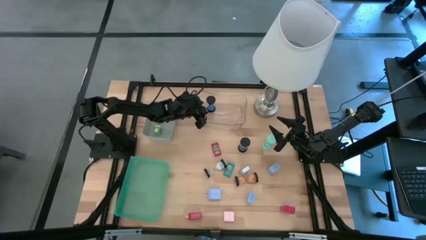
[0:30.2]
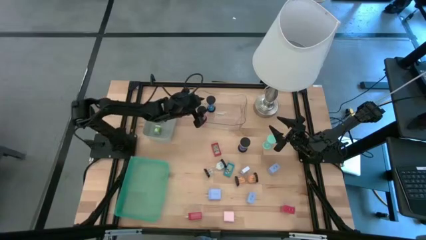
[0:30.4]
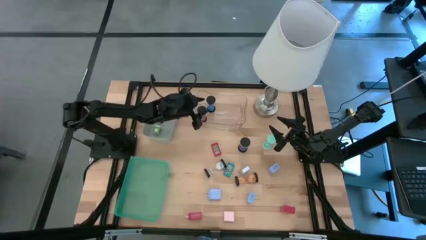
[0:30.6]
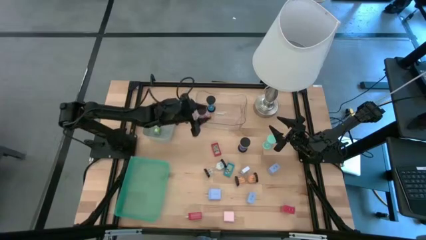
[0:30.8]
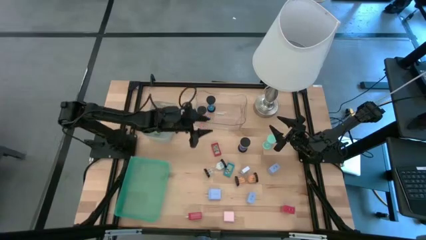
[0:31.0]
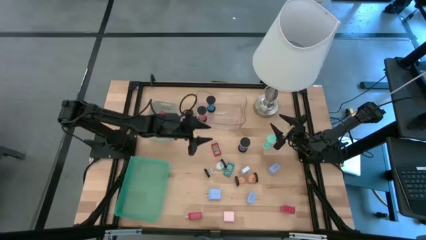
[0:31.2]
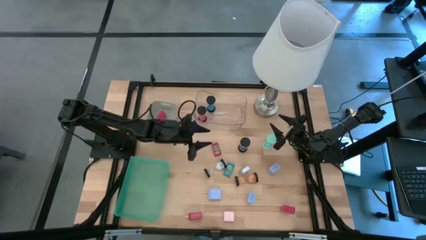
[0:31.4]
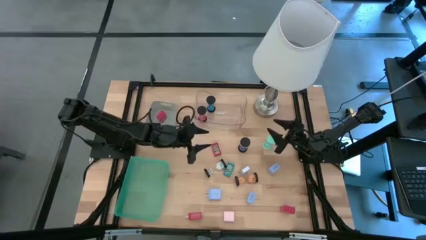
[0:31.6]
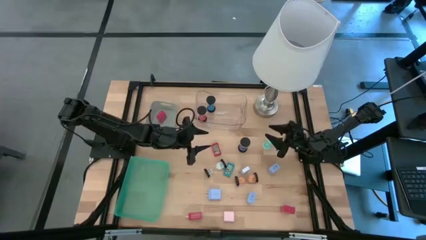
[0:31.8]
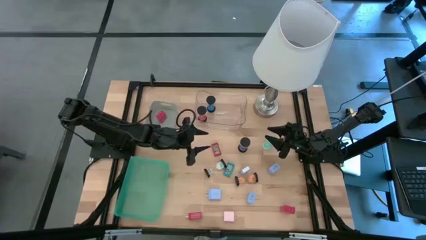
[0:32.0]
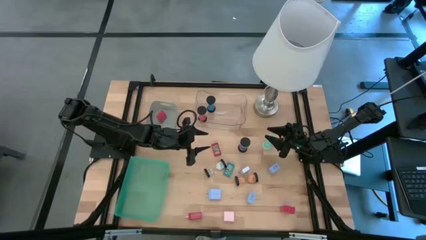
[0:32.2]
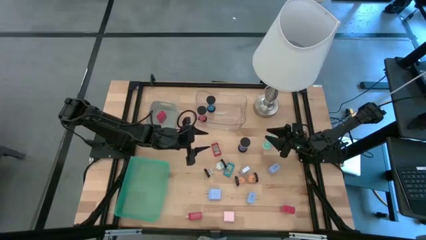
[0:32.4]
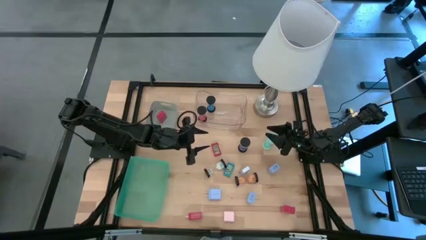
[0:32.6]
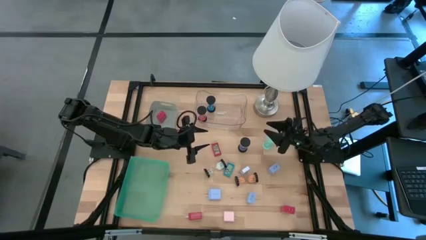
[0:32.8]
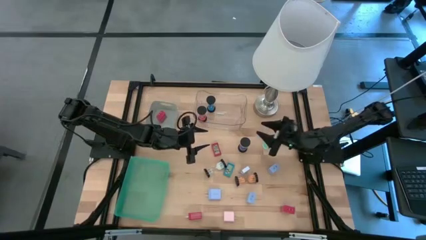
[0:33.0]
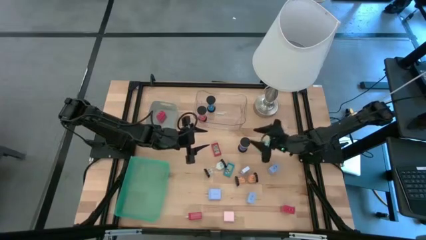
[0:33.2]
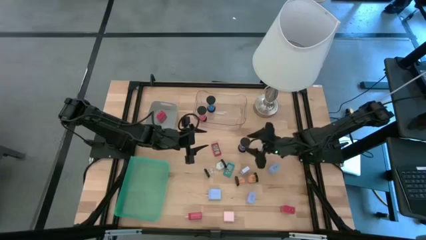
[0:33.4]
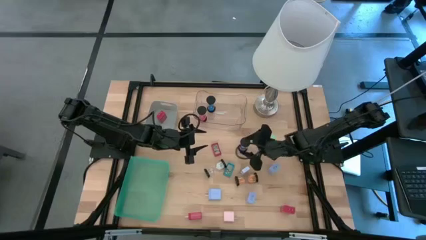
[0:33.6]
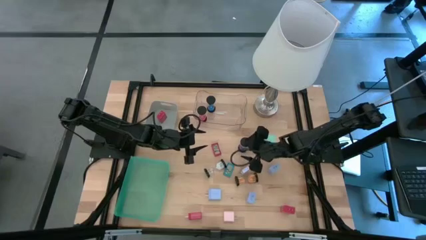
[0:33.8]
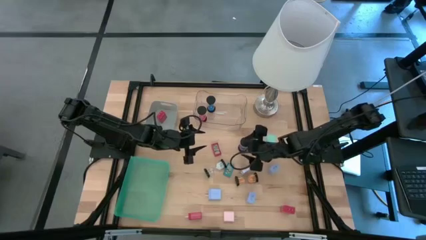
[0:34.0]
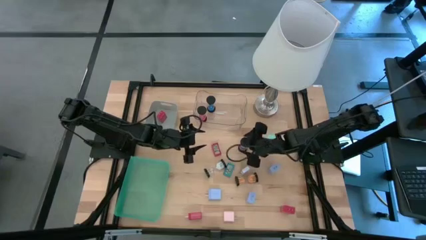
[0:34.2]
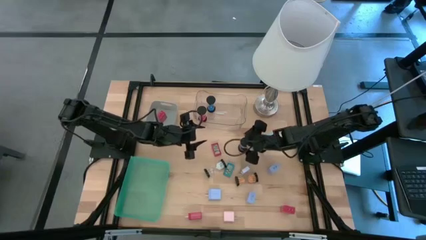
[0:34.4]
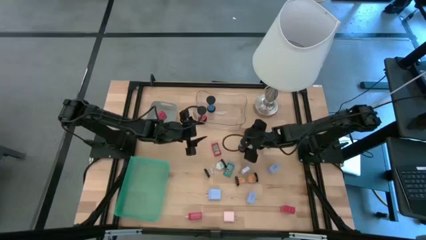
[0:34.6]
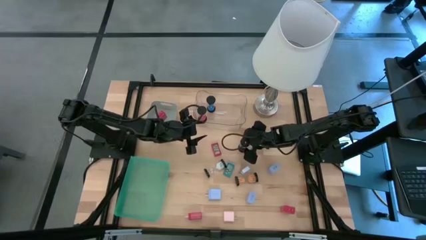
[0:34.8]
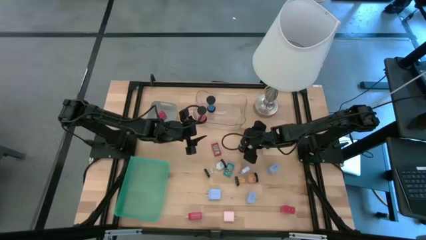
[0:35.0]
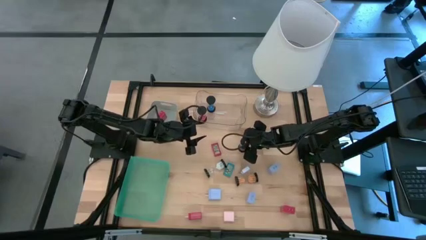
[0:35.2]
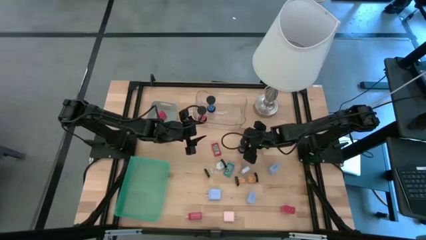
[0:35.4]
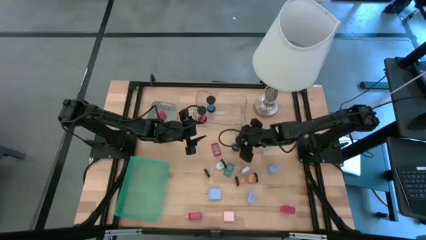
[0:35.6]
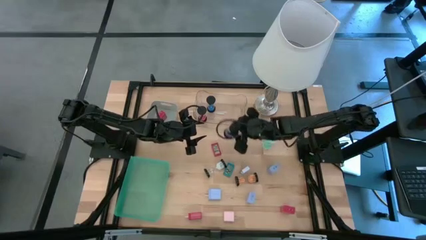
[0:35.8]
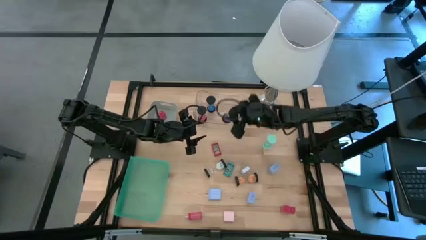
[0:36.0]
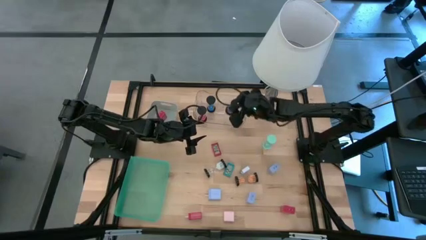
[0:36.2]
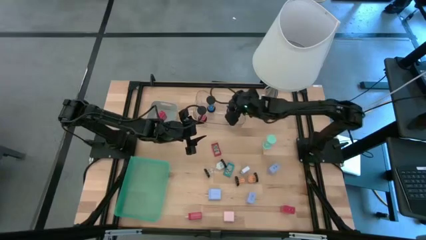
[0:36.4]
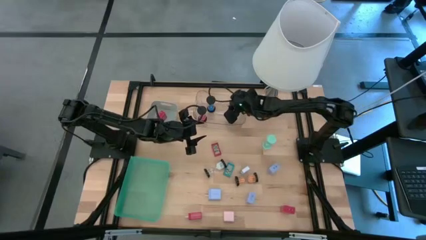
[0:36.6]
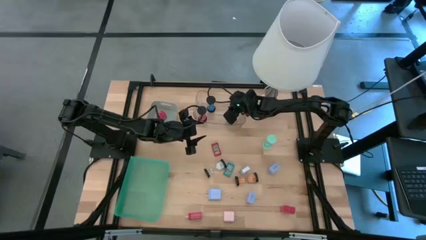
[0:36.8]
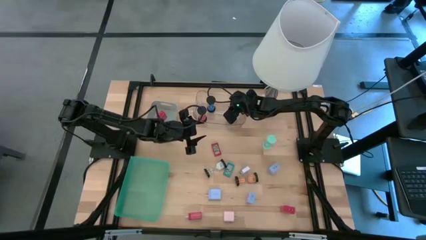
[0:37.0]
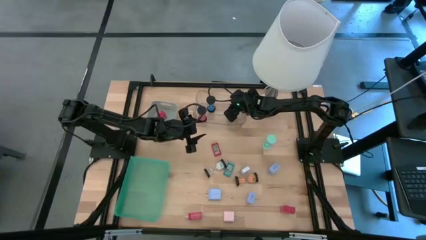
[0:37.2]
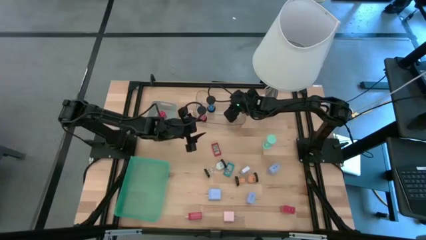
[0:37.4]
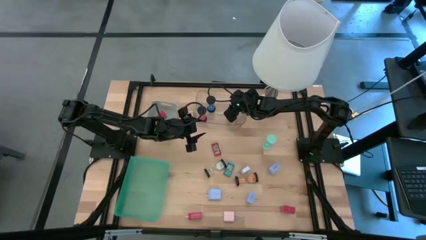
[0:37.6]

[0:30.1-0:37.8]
Task: Pick & Place Office items
Put the purple hourglass into the transparent bin

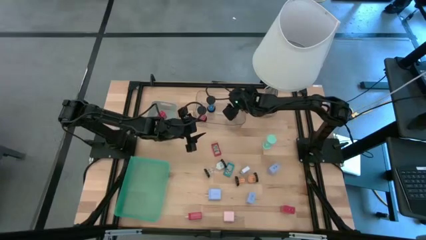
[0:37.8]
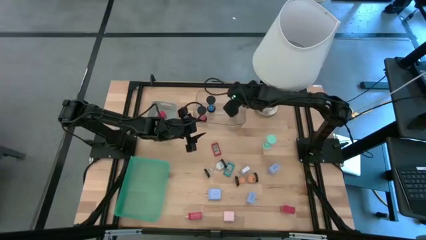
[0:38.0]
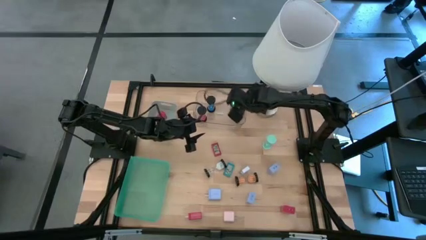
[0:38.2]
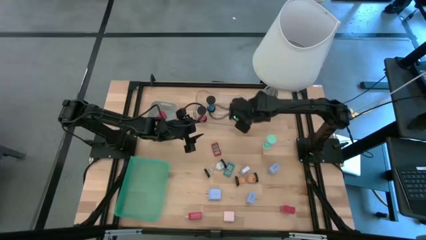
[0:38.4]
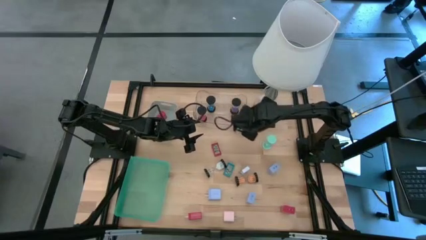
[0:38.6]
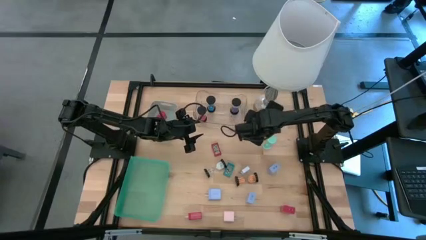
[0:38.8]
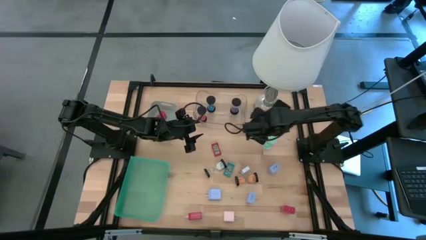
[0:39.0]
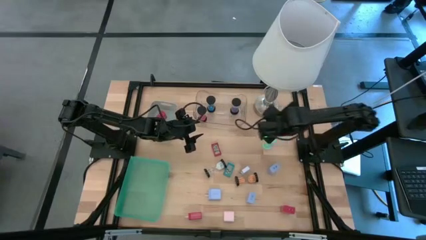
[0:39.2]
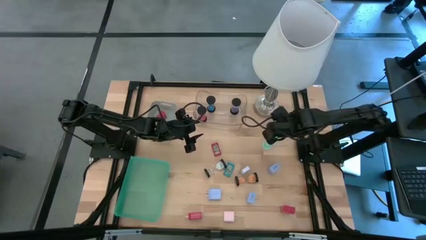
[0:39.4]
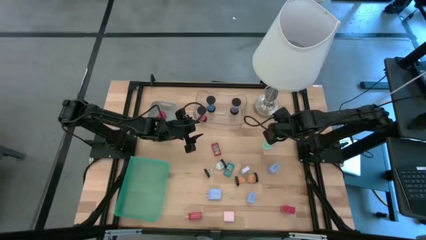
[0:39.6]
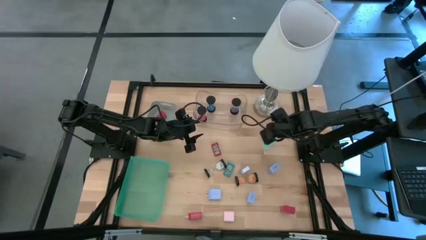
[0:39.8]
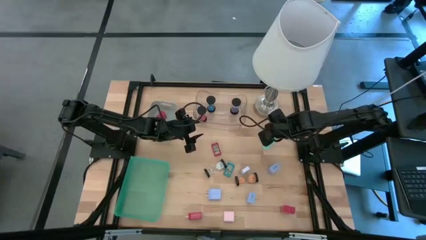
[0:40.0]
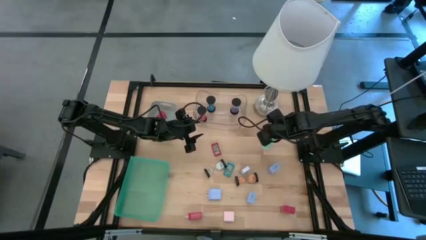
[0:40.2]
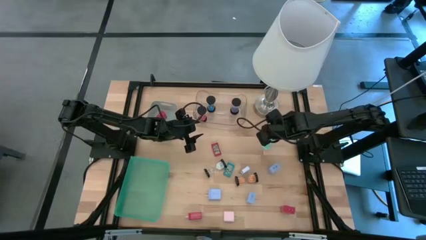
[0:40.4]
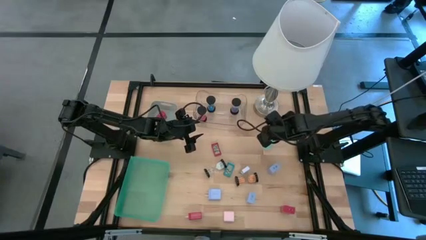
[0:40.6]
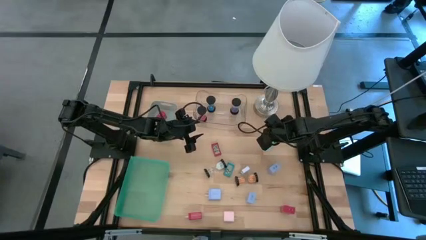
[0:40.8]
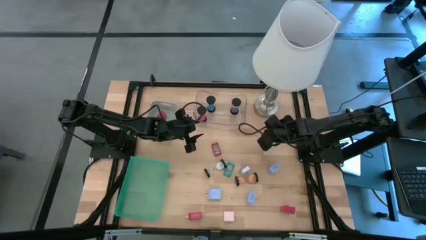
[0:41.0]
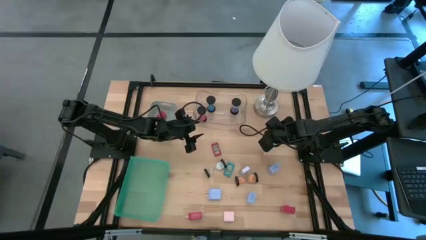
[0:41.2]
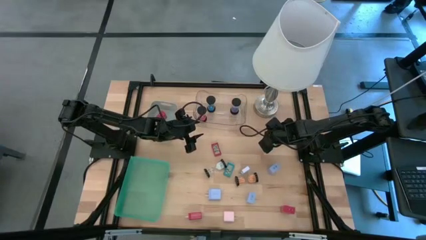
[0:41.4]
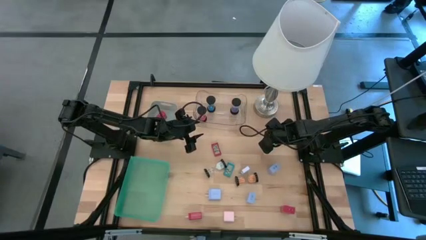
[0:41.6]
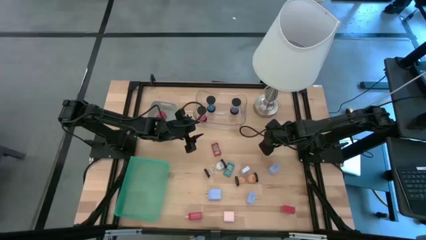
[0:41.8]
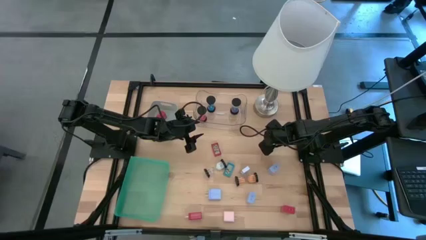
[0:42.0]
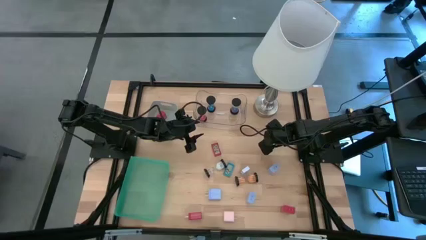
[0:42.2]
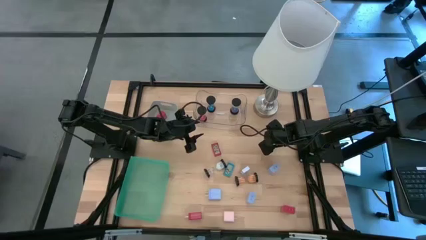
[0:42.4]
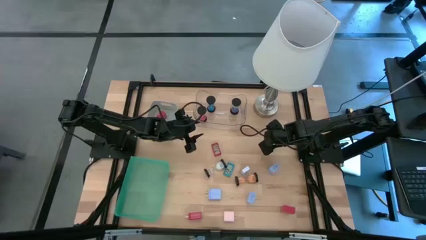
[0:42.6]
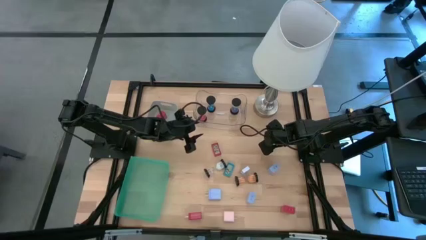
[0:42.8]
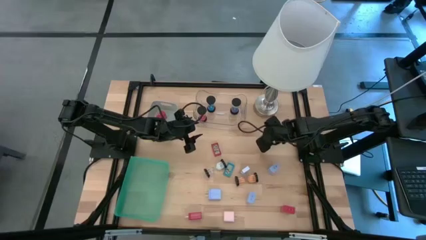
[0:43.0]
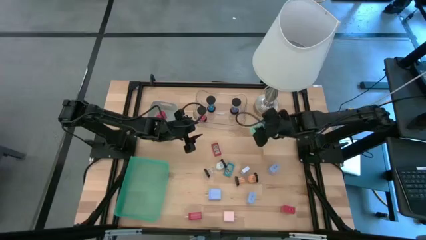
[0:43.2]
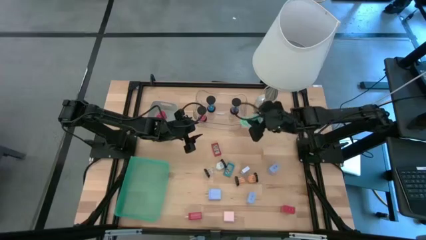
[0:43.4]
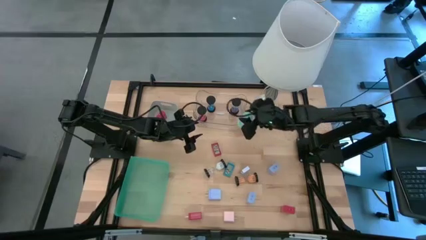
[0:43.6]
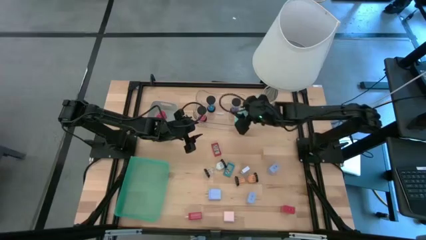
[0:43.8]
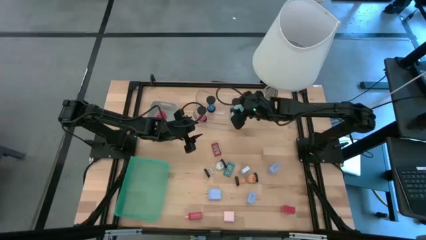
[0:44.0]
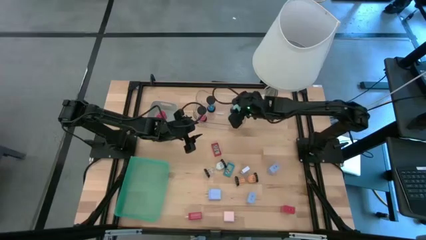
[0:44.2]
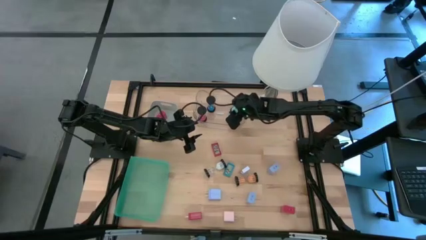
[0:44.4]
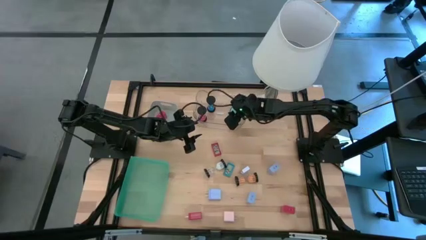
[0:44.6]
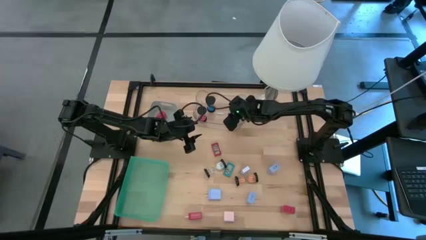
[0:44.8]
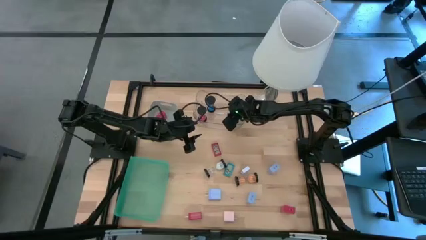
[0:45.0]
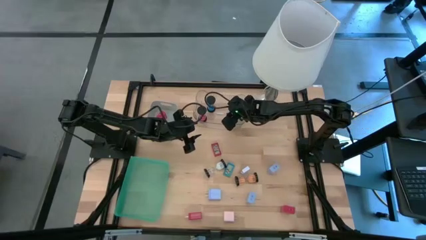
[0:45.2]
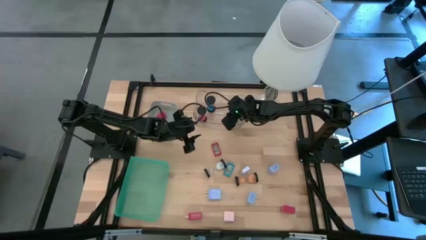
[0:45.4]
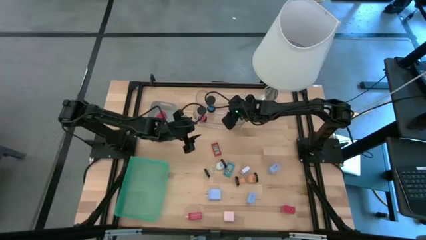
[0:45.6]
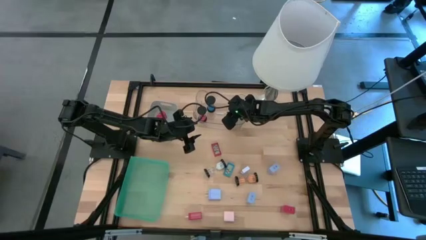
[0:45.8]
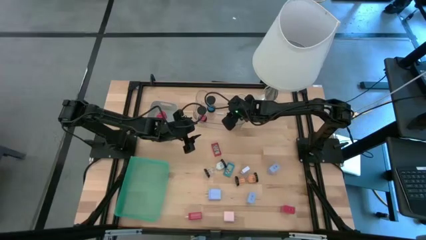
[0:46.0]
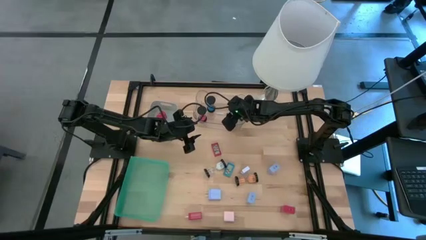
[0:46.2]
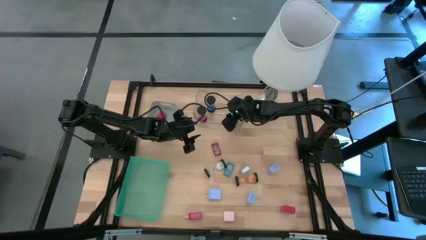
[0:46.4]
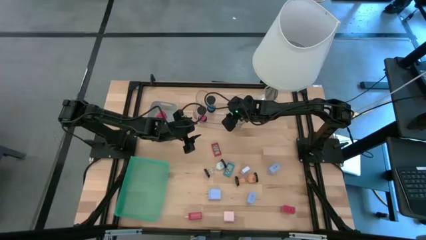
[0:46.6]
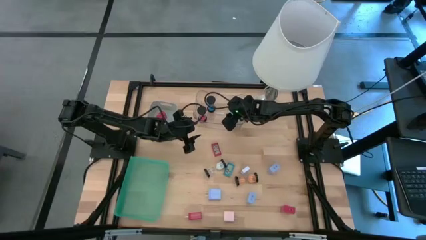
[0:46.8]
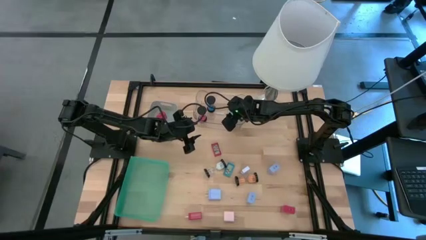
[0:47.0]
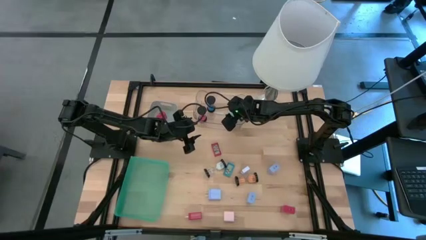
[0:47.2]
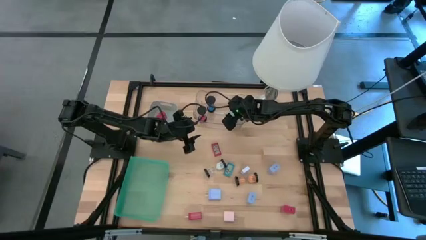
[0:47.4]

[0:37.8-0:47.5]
Put the light blue hourglass into the transparent bin
